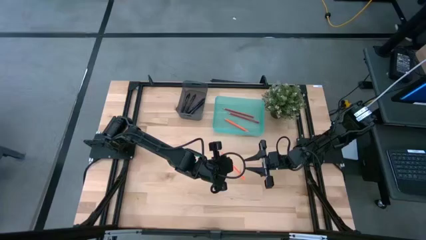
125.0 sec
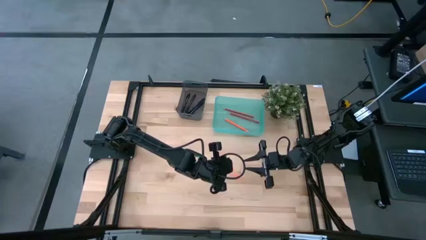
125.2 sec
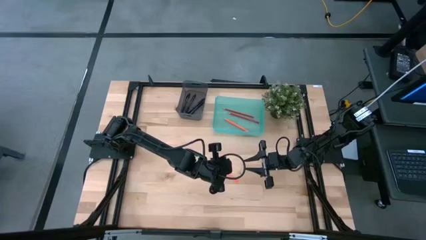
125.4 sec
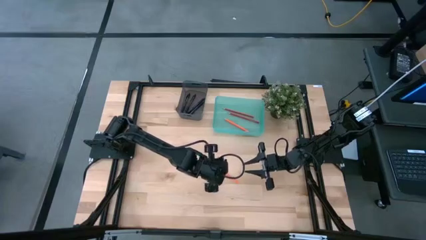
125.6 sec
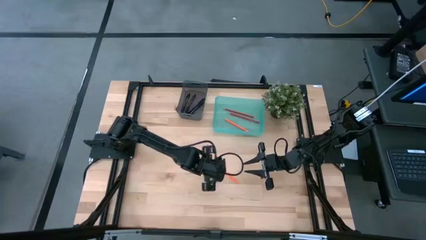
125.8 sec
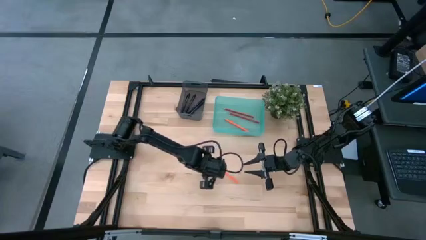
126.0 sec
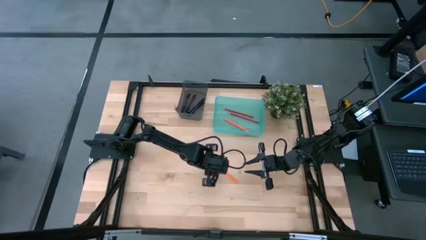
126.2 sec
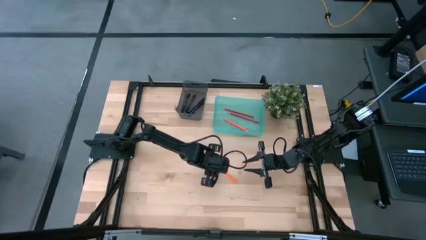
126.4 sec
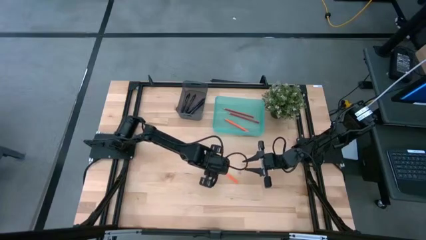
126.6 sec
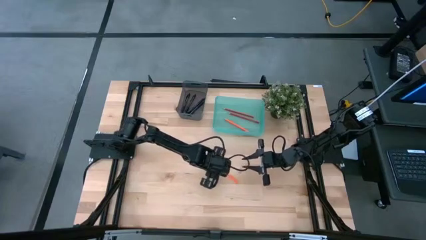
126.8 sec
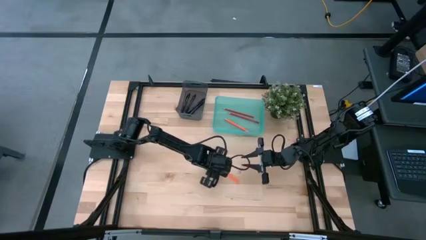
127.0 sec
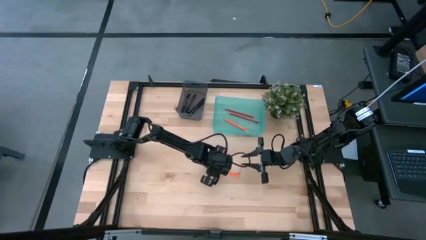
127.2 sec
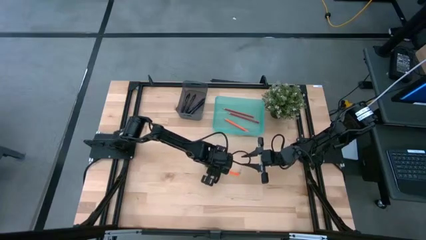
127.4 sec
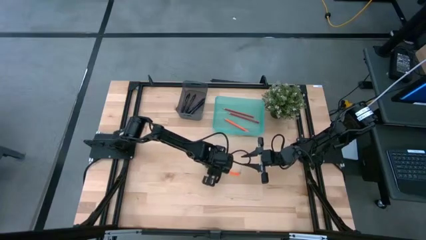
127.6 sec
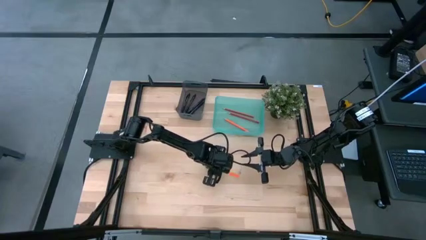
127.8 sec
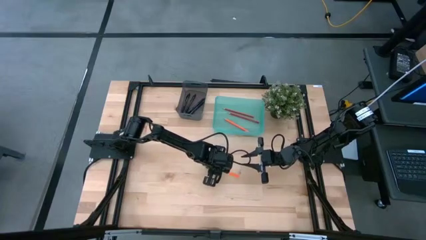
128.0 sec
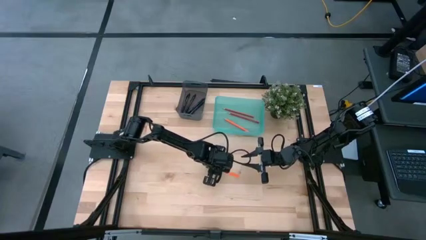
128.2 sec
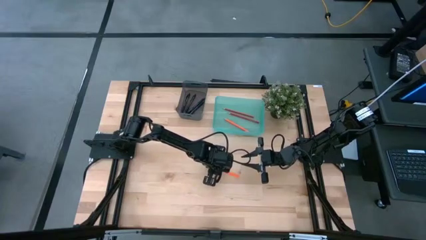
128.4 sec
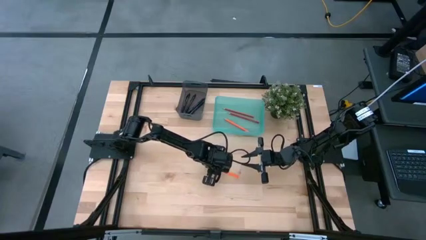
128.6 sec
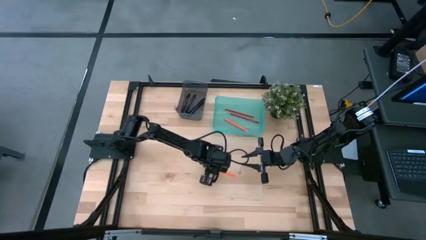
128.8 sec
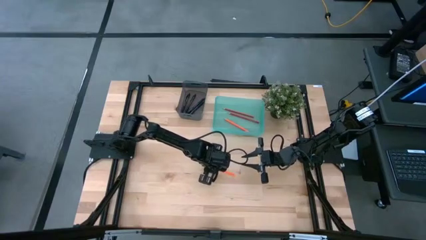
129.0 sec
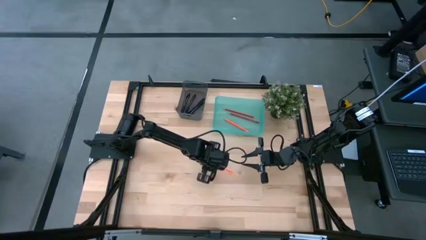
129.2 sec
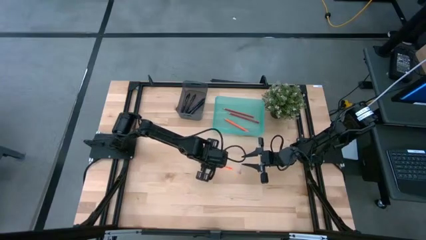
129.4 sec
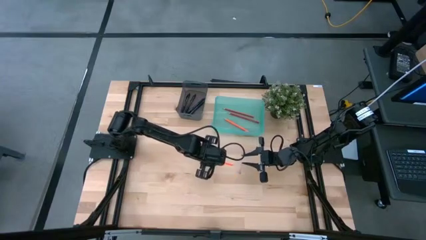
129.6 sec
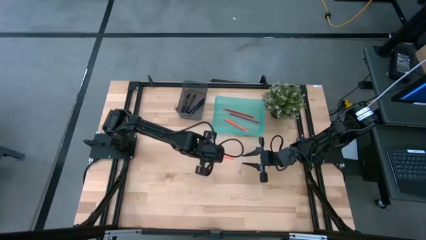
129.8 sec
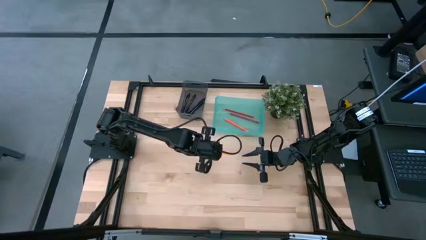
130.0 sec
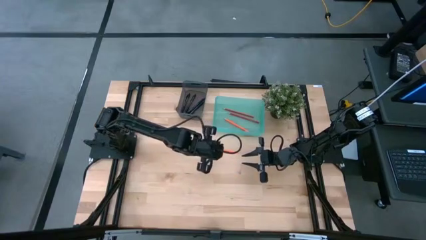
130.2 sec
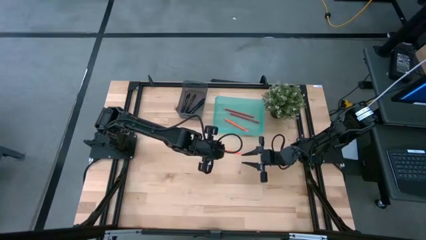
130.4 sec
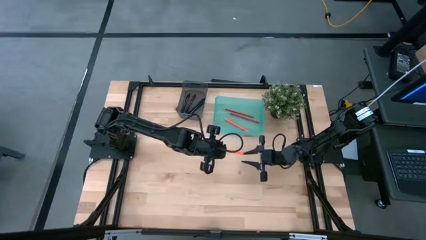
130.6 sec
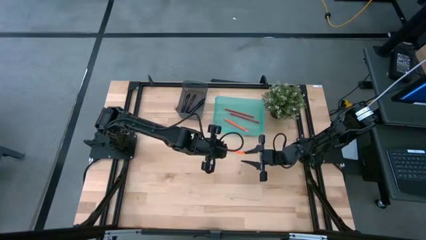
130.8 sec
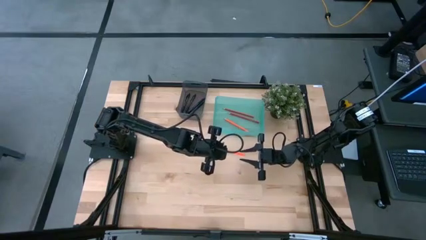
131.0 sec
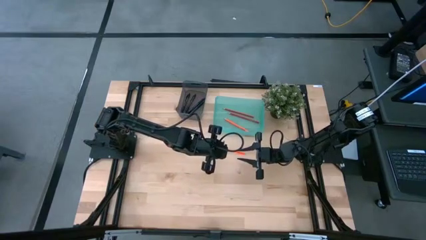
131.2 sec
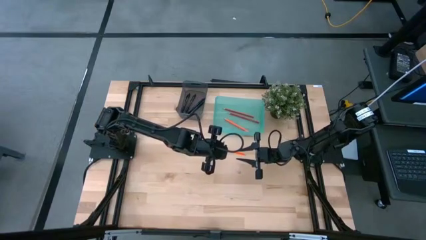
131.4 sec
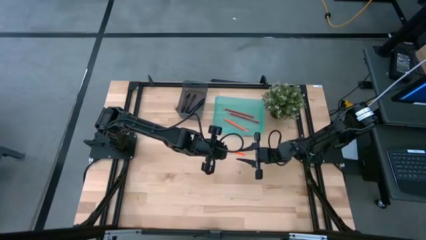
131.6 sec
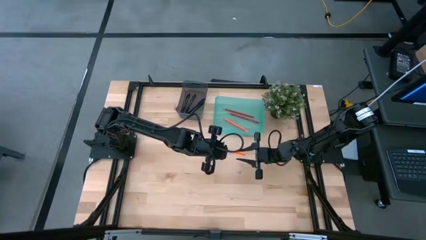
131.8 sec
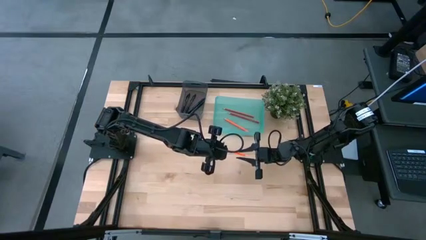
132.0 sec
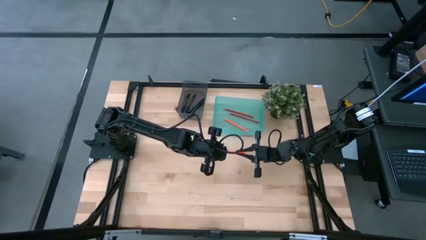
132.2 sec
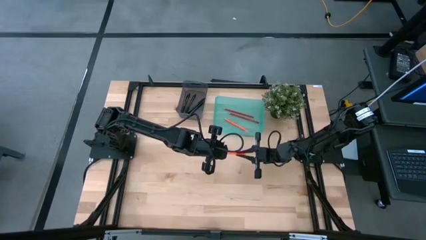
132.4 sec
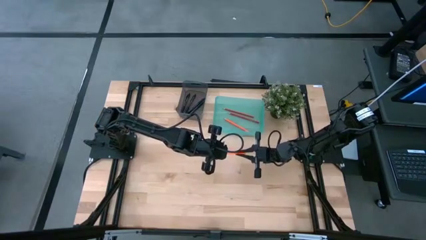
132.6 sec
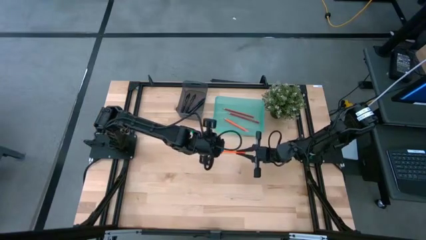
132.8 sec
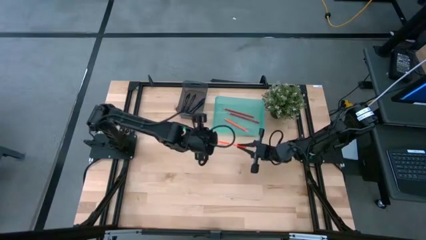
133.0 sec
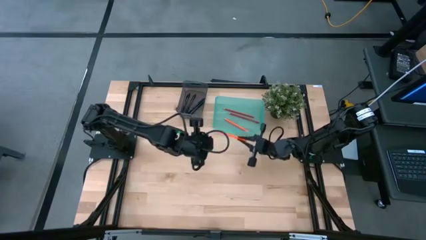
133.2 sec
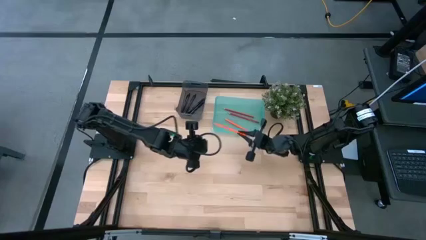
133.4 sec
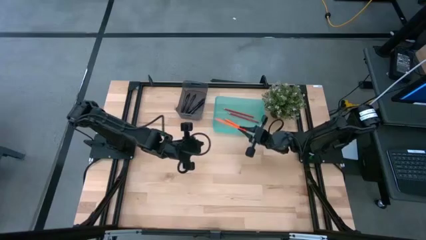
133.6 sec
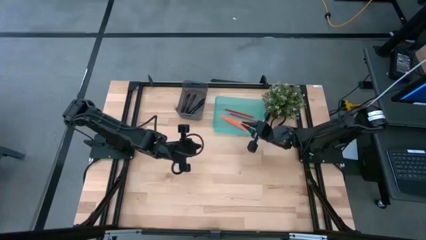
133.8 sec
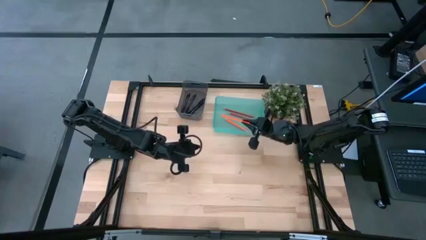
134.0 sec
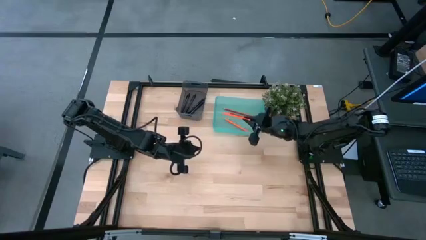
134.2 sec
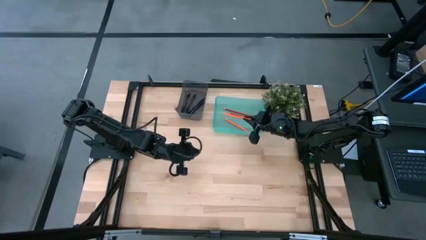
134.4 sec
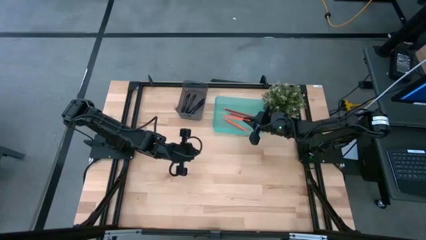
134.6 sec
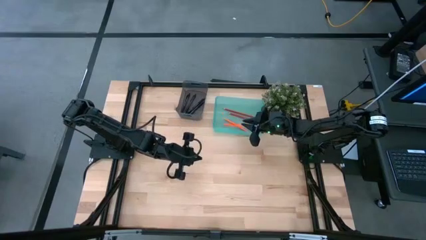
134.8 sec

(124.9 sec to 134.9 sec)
Task: Sort pens & pencils
Put the orange pencil into the green bin

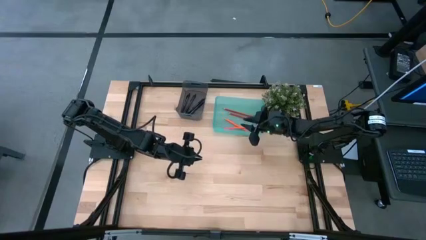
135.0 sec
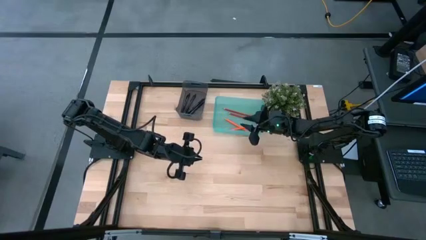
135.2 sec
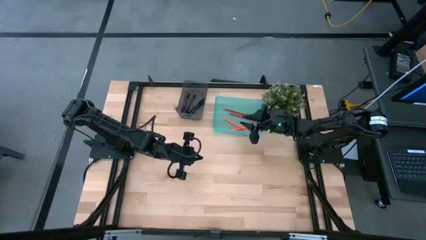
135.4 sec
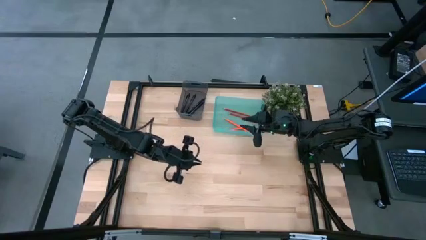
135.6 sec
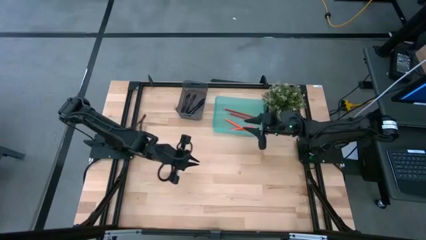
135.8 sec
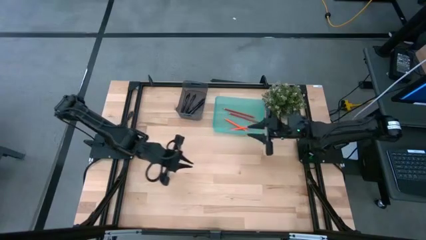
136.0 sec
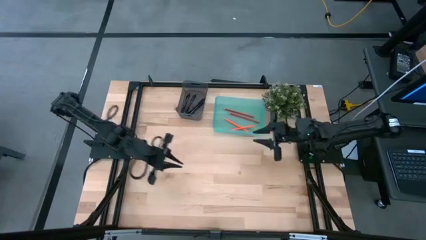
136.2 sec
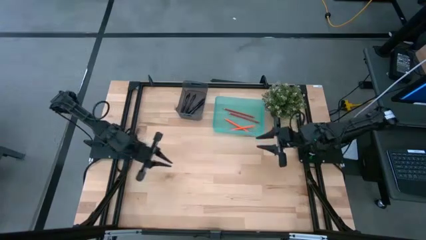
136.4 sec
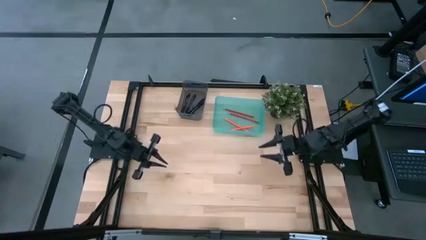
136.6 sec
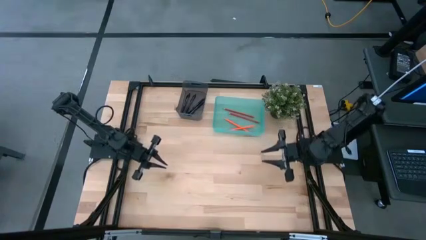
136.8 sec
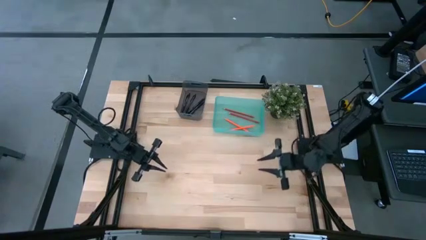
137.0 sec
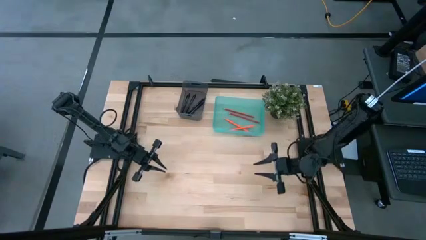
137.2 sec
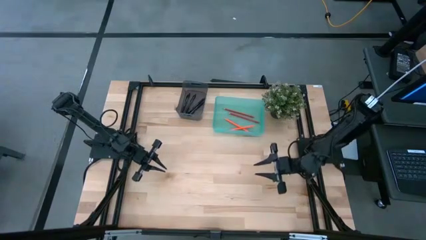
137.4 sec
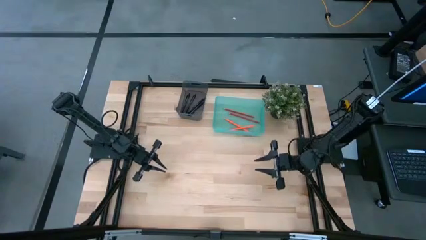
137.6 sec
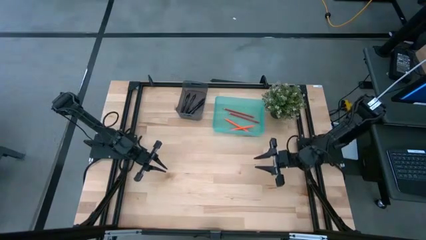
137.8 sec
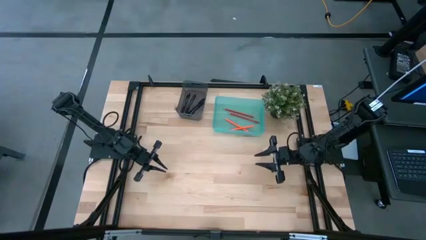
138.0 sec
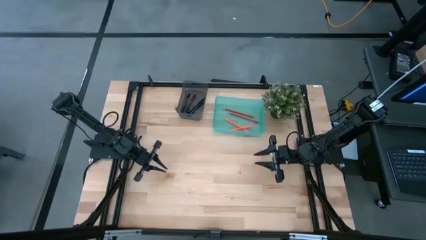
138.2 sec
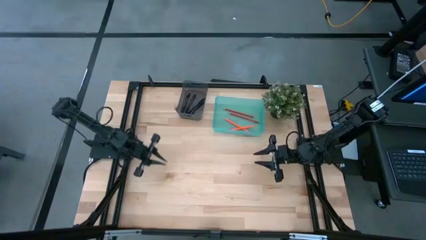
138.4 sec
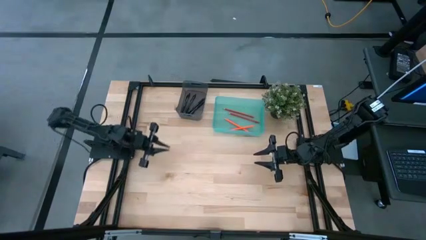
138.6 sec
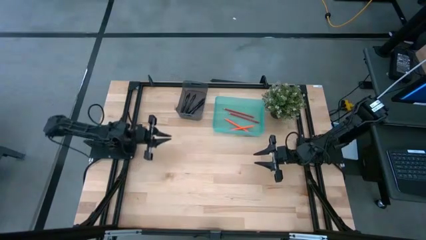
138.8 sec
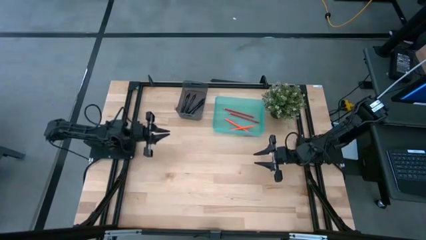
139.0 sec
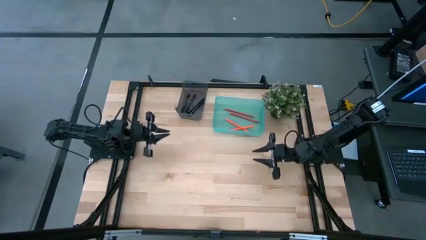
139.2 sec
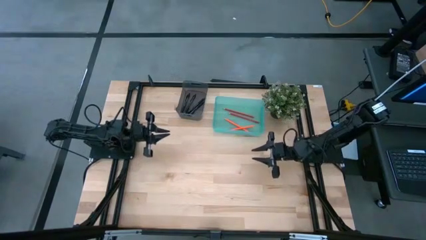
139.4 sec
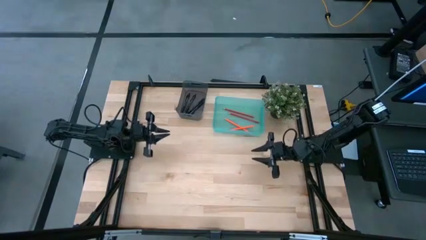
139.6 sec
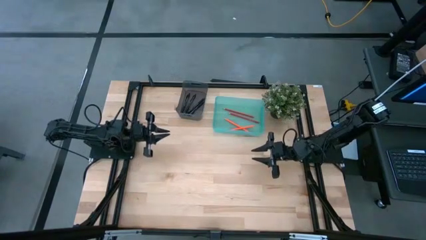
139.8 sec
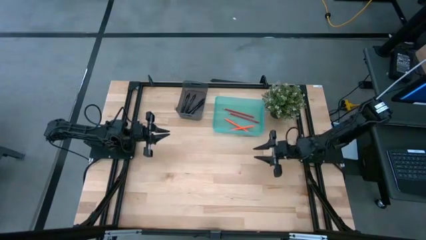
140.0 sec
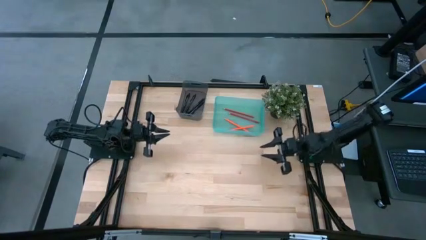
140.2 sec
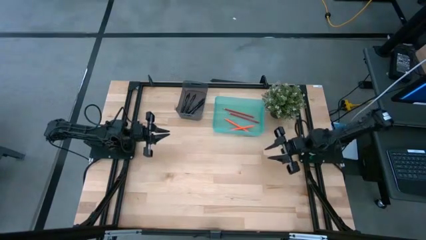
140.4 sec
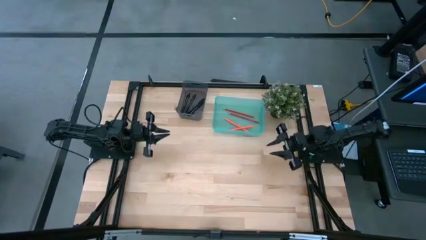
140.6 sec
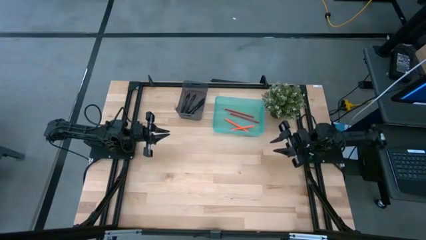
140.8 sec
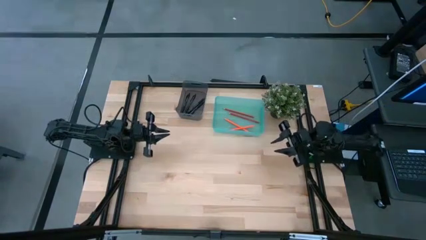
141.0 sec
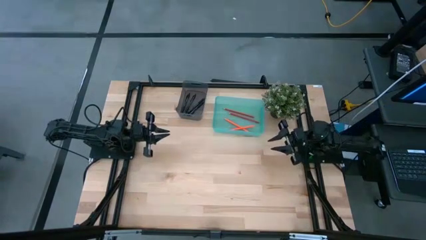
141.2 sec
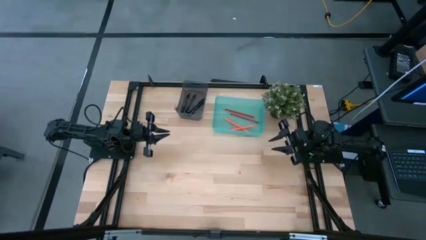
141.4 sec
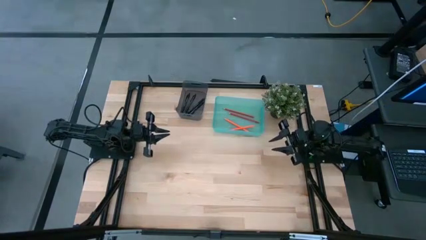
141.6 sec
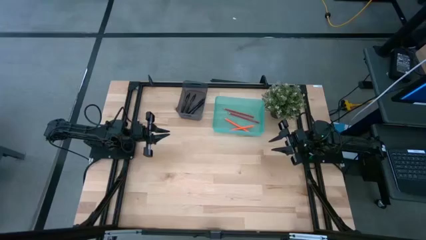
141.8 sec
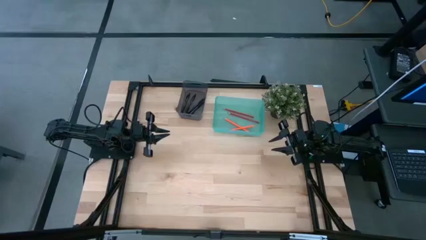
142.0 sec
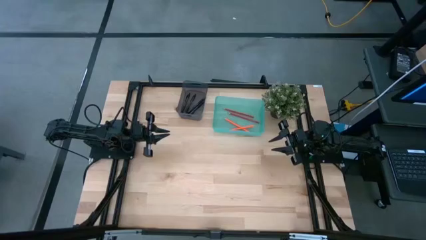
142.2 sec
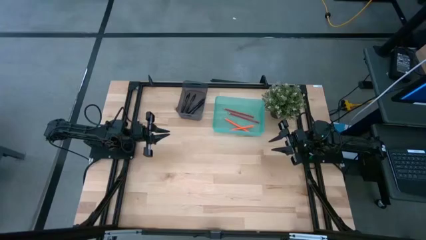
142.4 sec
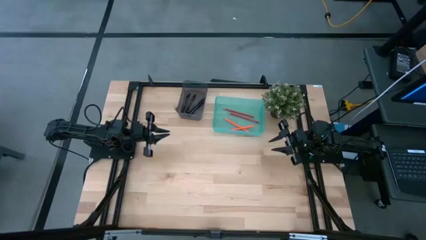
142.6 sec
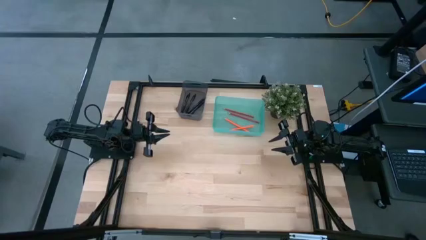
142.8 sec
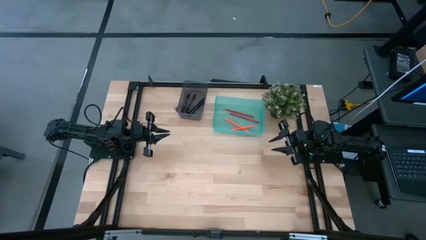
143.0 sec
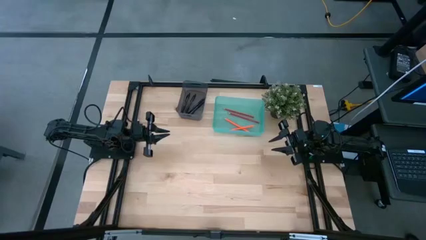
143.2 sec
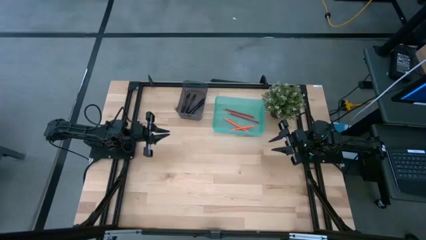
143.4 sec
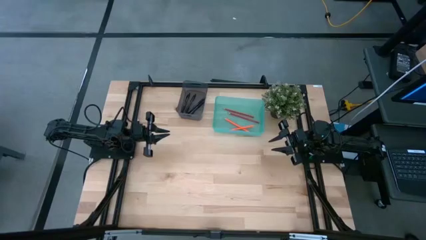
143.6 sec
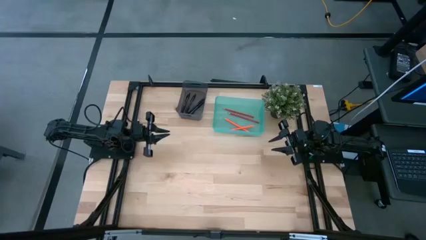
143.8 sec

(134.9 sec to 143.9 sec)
Return to Home Position
